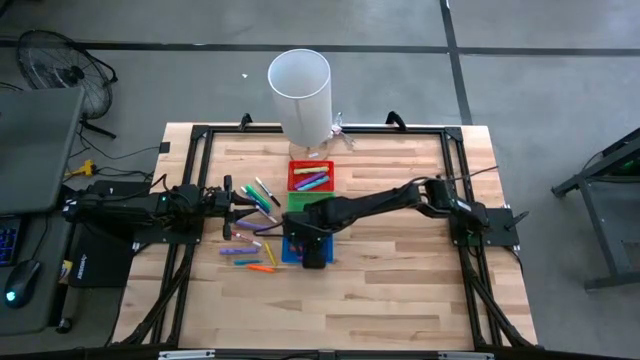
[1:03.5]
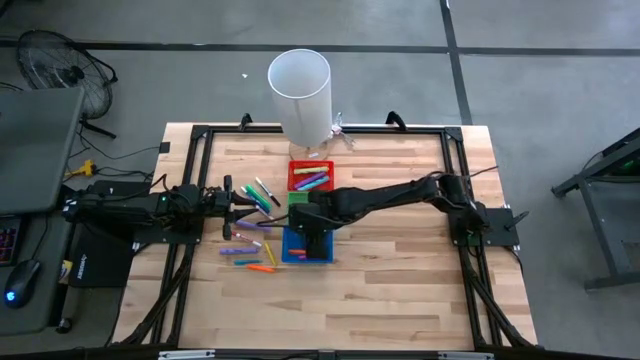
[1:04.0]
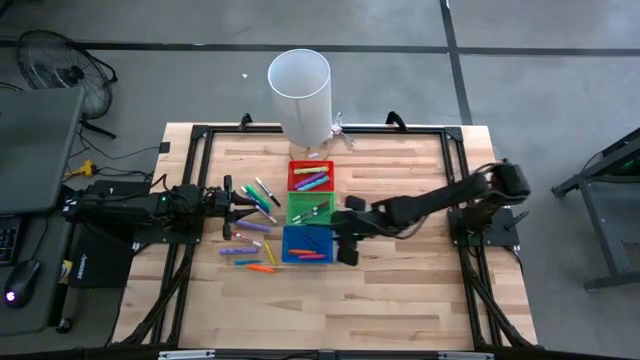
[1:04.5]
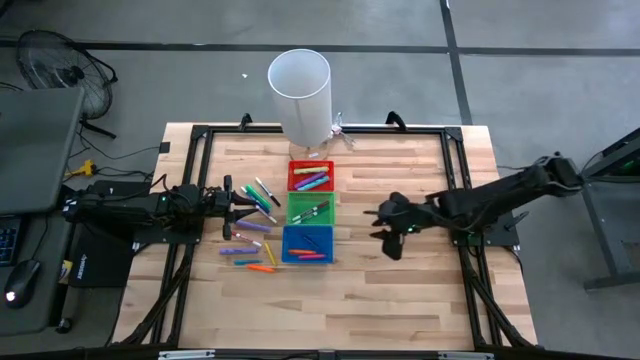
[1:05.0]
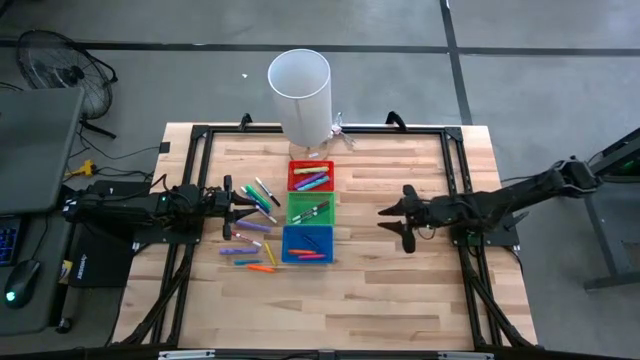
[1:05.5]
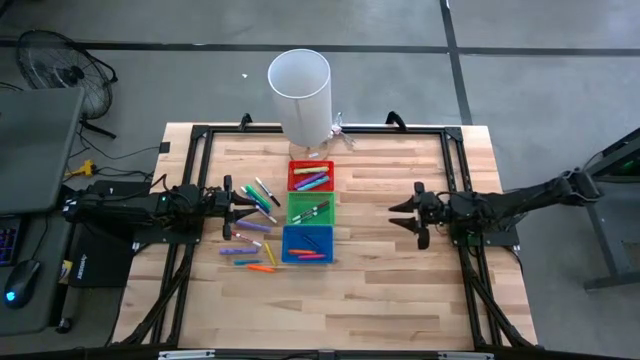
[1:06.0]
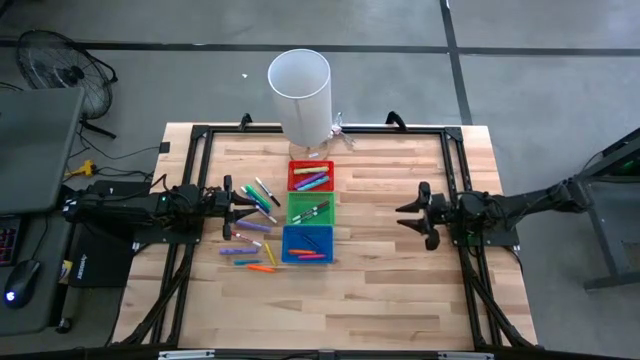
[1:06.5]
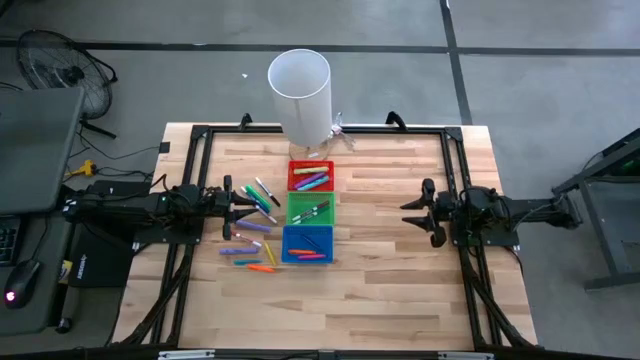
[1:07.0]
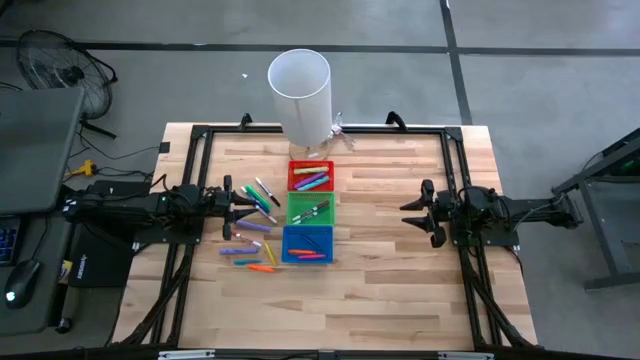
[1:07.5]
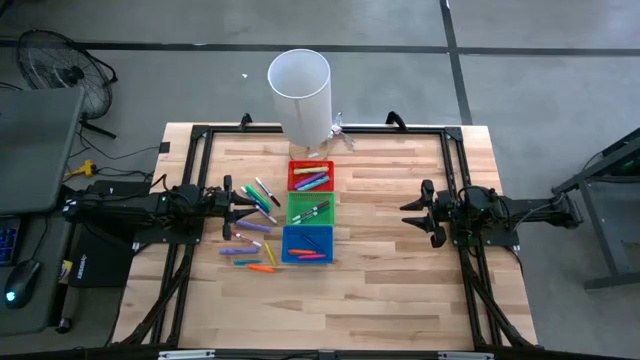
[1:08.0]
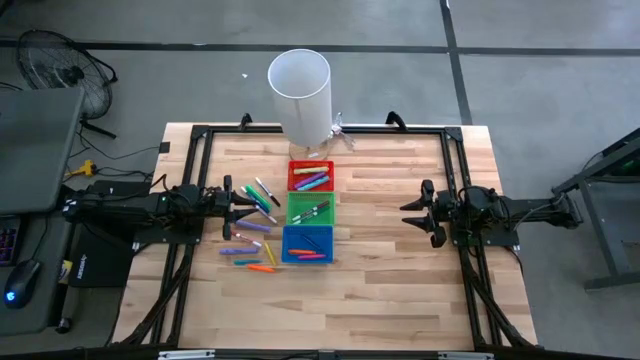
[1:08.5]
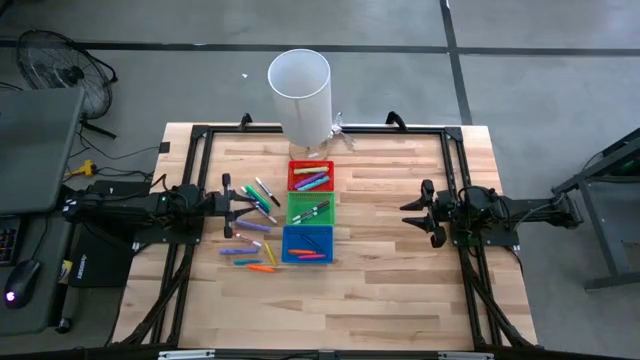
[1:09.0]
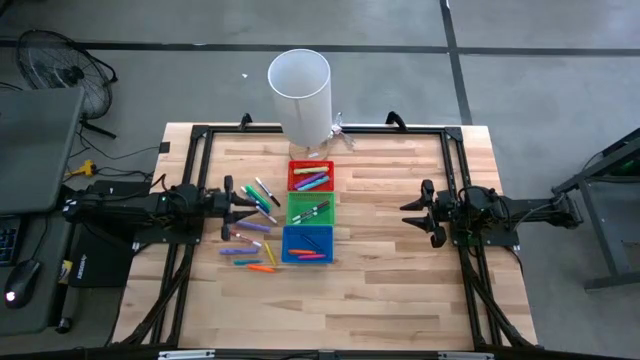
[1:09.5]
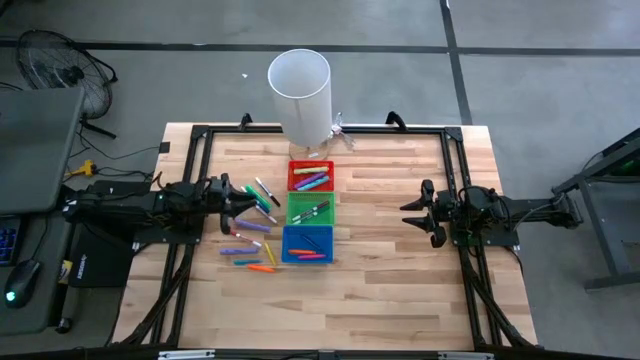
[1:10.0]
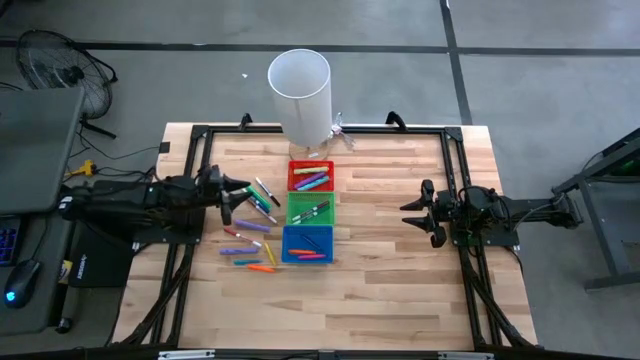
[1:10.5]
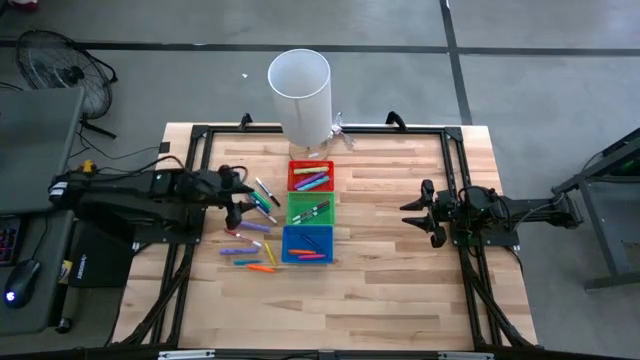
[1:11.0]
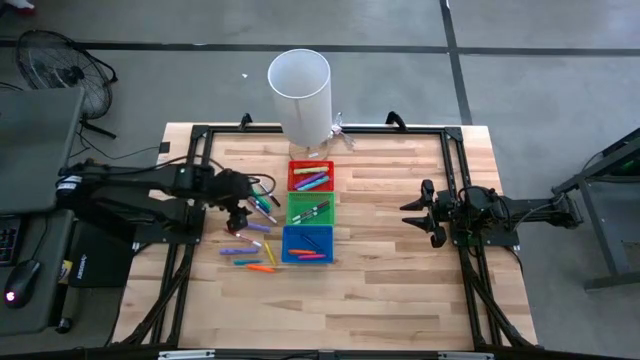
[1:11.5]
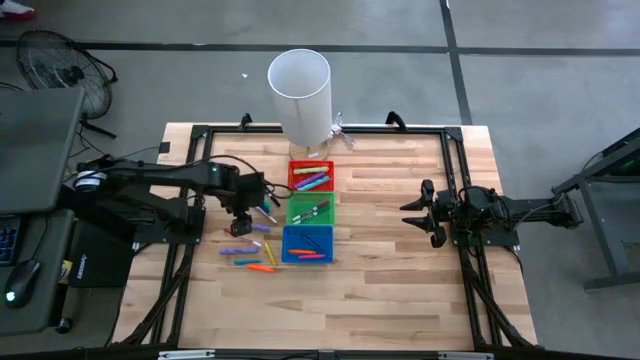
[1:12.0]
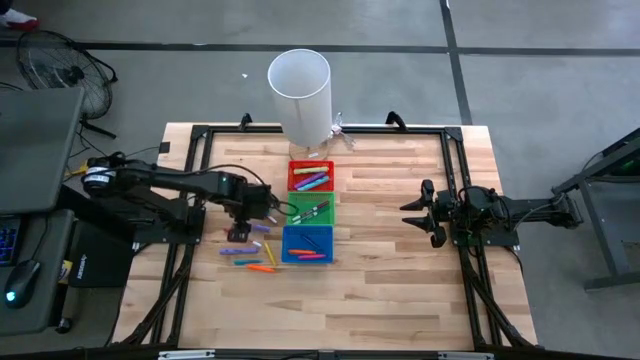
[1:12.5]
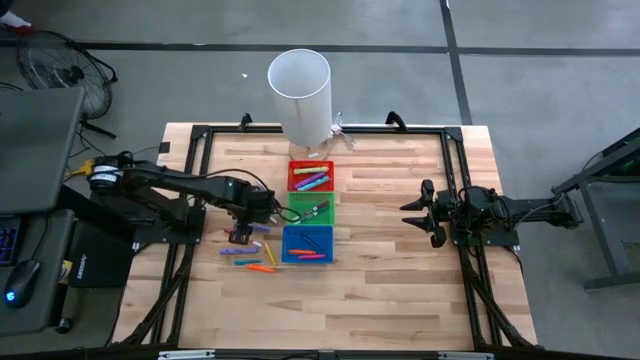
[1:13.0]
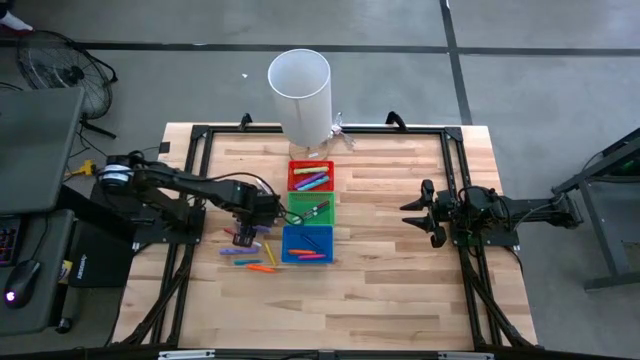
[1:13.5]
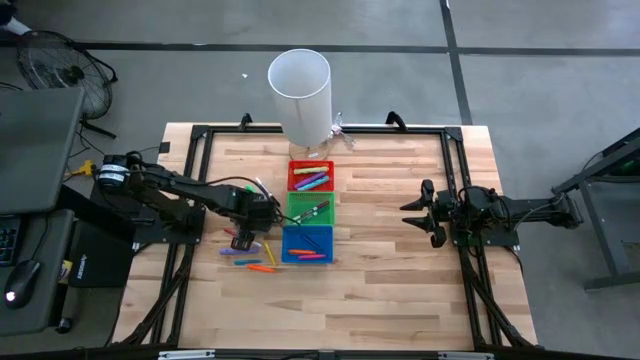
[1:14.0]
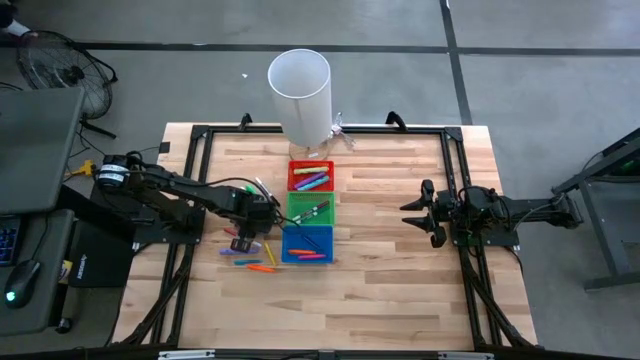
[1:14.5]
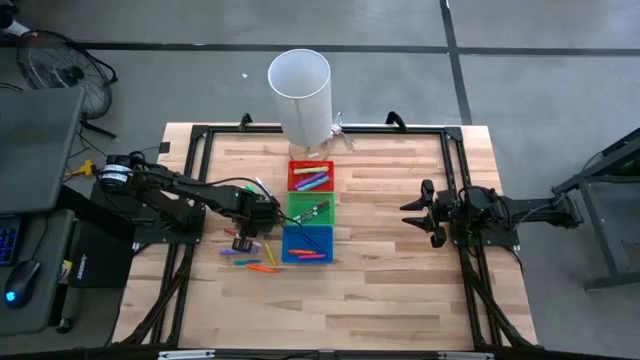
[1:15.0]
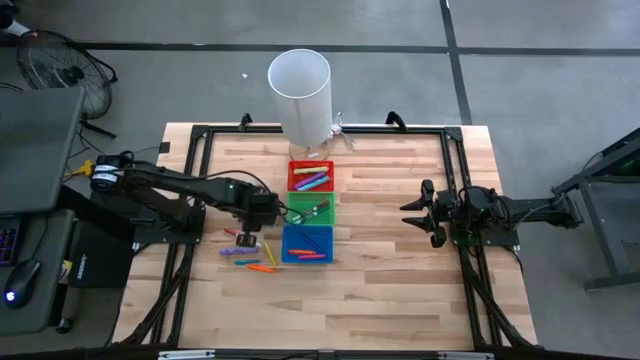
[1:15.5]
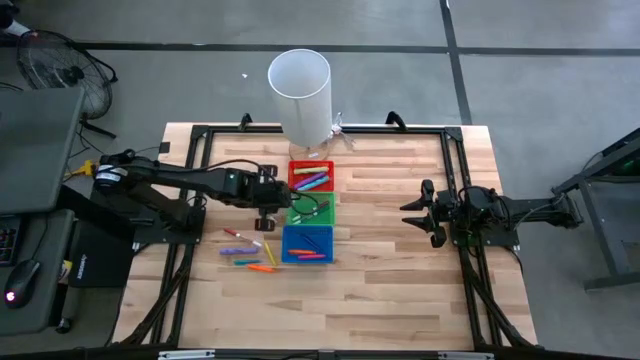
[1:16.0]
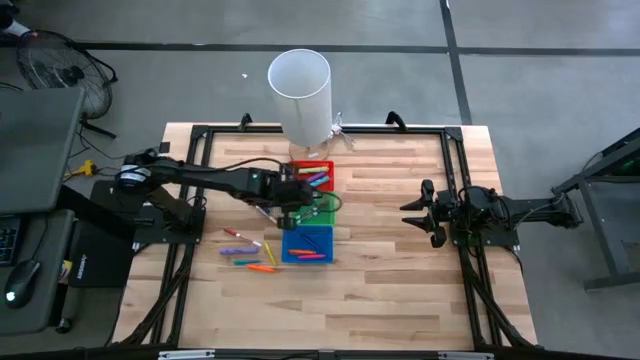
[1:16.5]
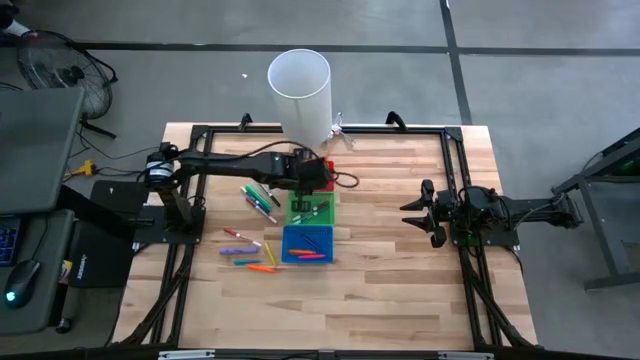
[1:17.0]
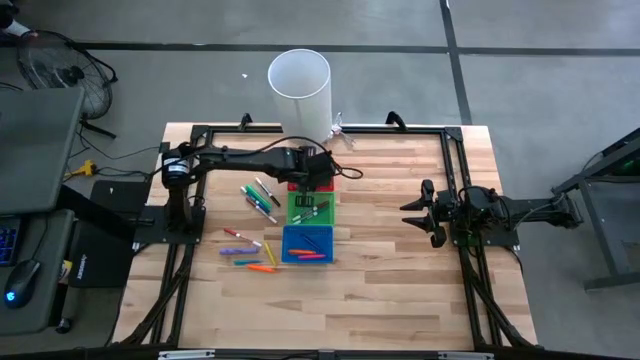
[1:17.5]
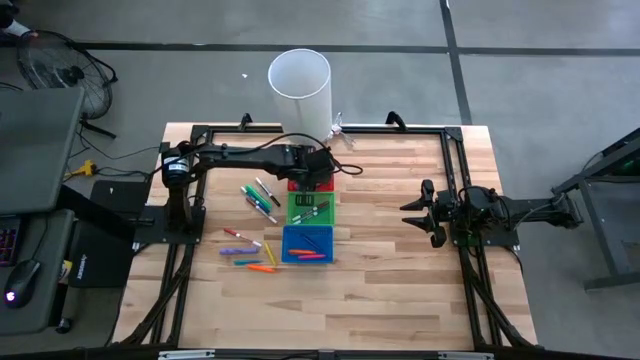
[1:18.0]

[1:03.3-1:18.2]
Task: Pick & Place Markers
Put the top violet highlighter into the red bin

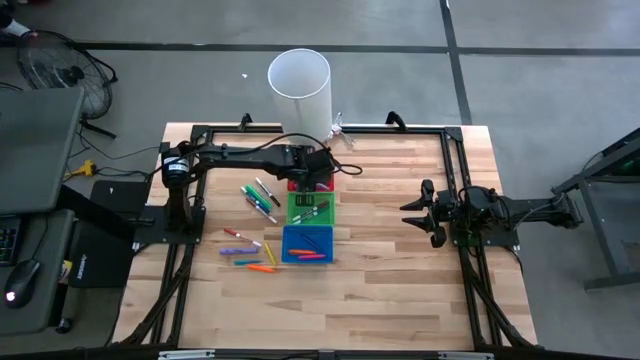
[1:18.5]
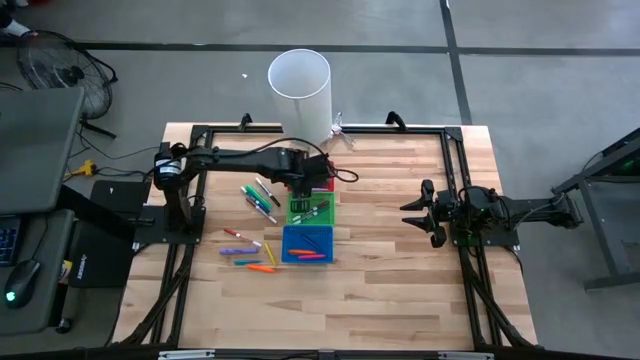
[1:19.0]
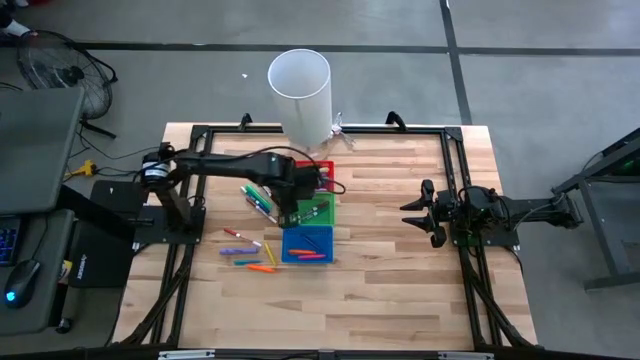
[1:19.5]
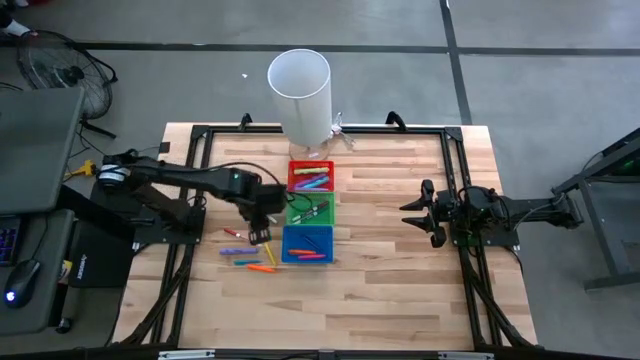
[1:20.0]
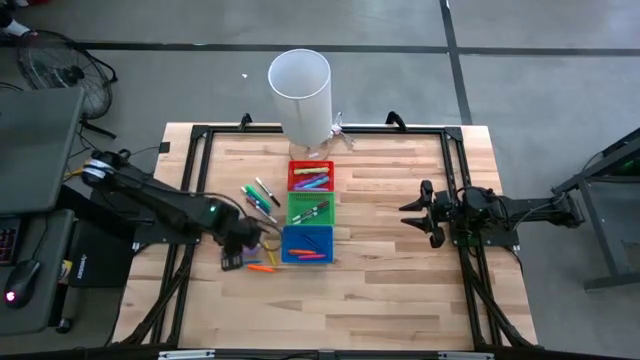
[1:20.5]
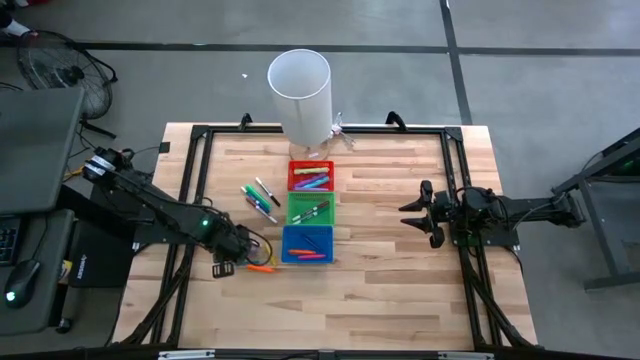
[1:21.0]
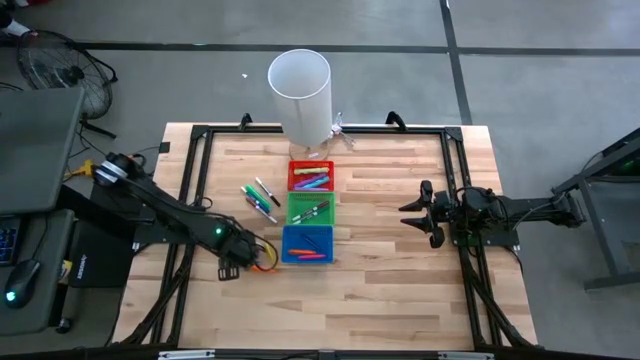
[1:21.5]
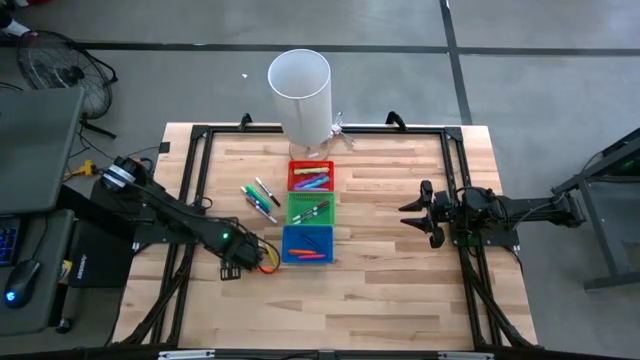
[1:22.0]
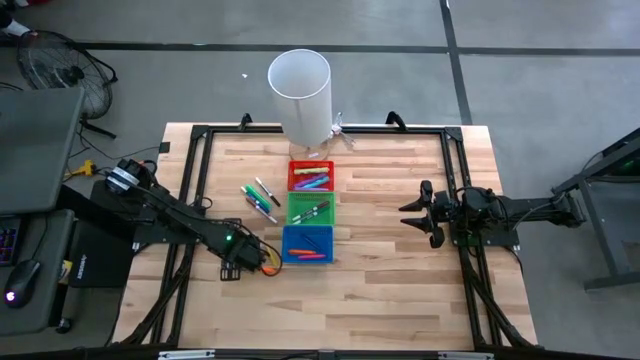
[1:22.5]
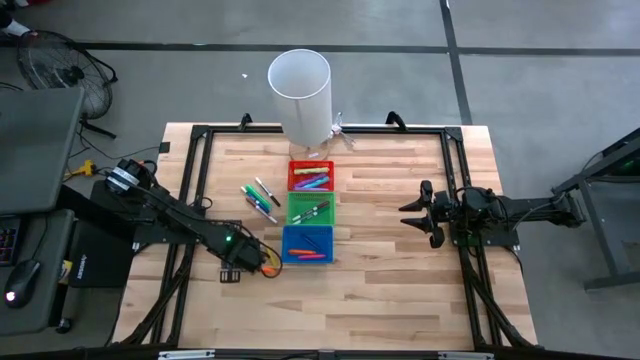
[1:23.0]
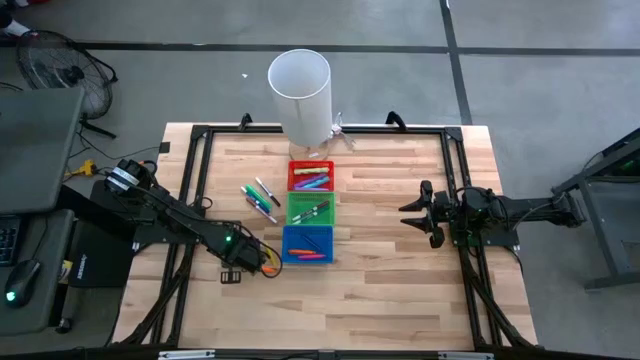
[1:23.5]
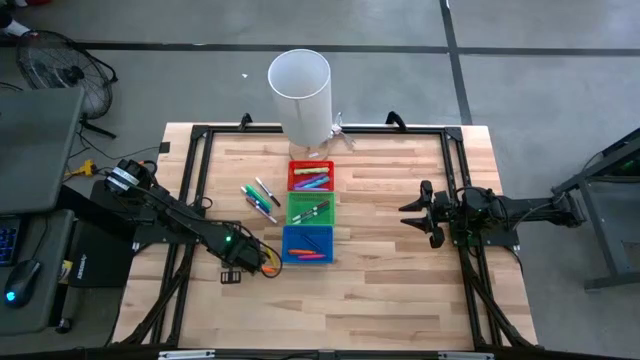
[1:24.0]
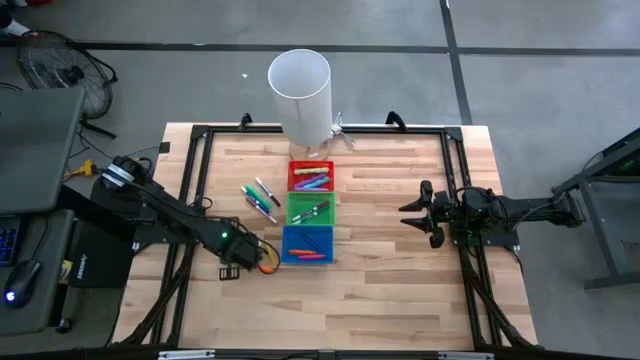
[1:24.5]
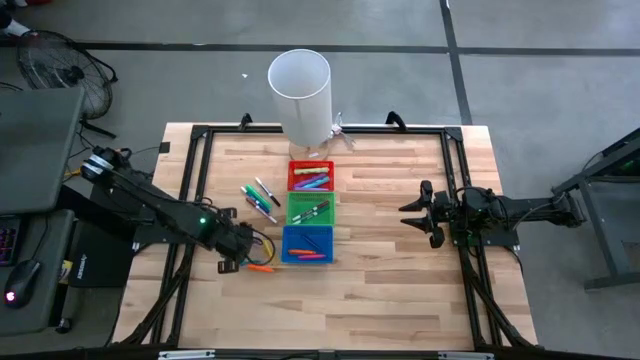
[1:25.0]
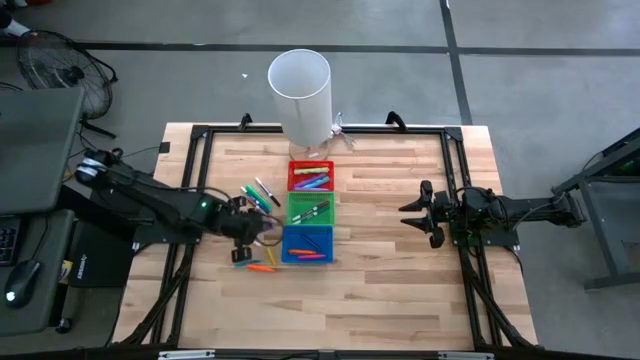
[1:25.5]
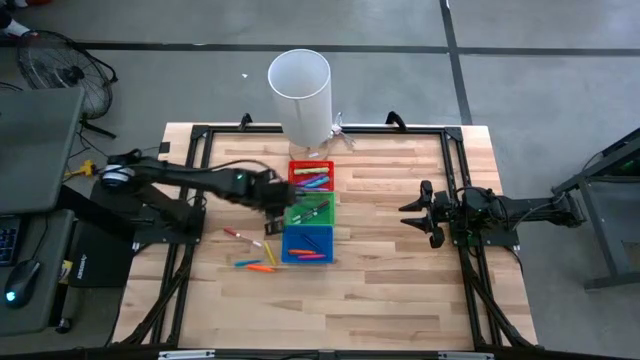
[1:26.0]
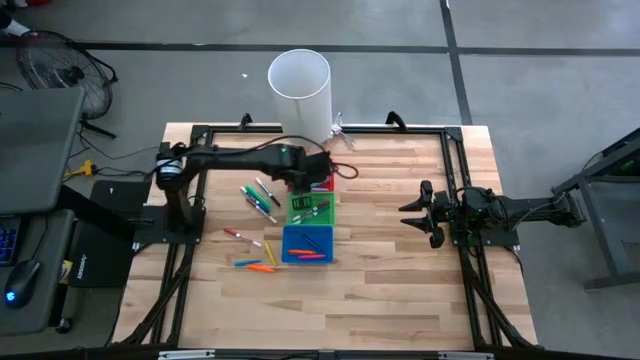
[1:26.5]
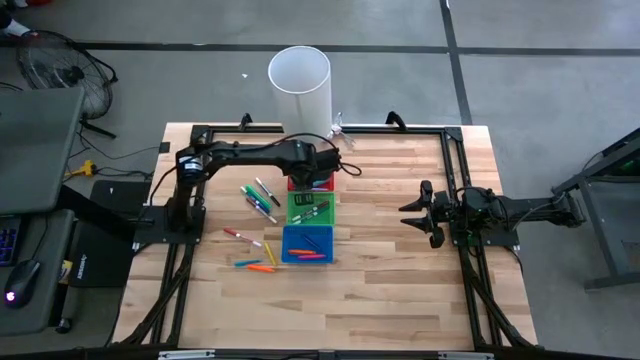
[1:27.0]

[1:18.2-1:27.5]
Put the light violet highlighter into the red bin
